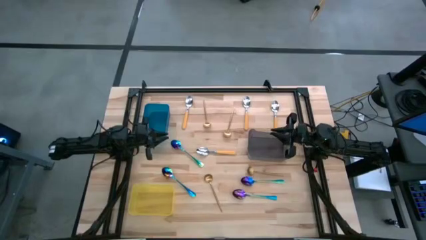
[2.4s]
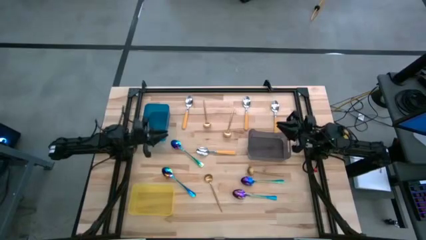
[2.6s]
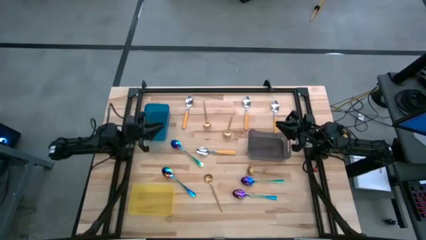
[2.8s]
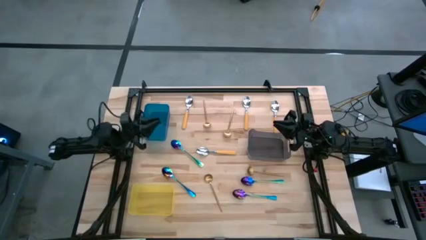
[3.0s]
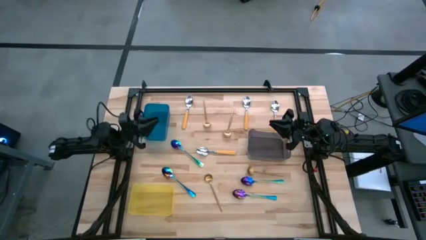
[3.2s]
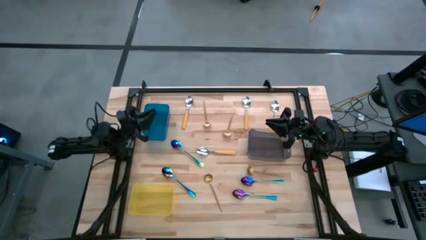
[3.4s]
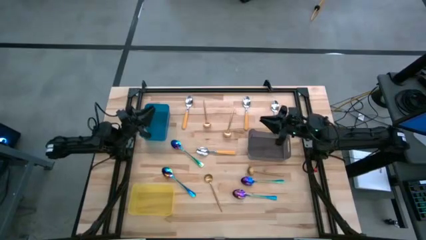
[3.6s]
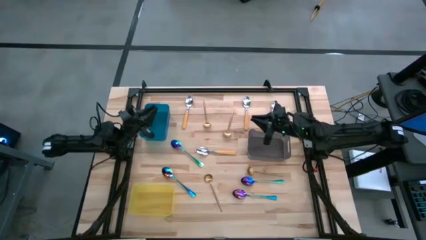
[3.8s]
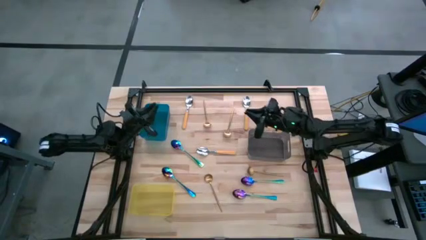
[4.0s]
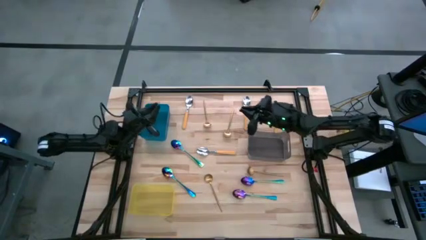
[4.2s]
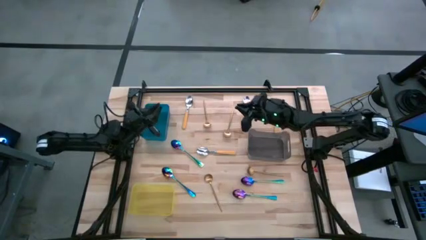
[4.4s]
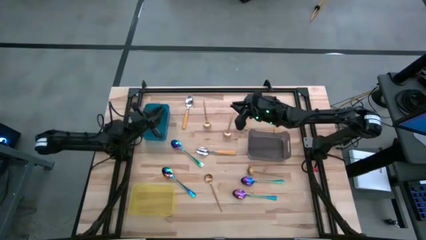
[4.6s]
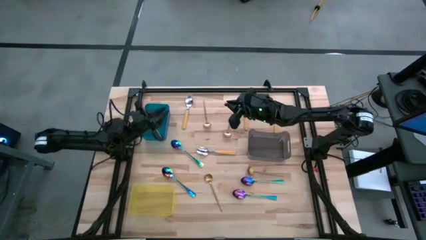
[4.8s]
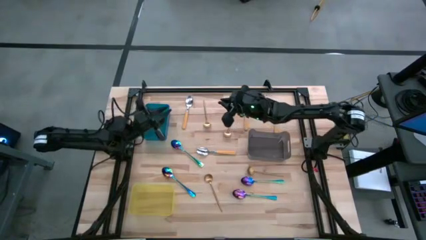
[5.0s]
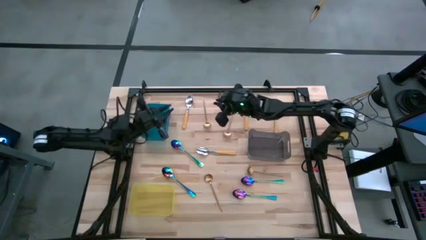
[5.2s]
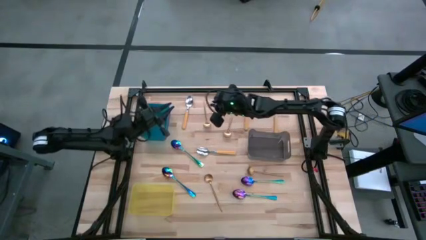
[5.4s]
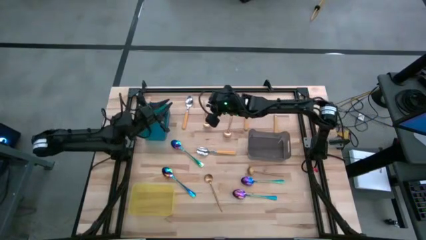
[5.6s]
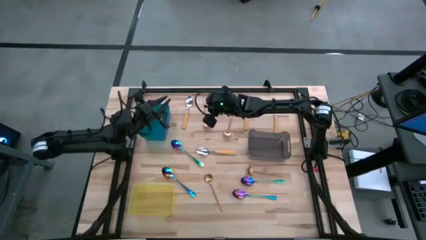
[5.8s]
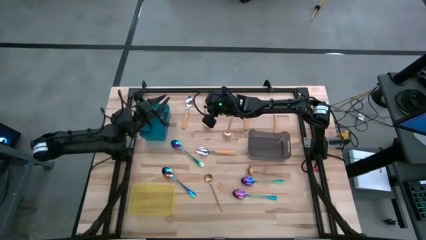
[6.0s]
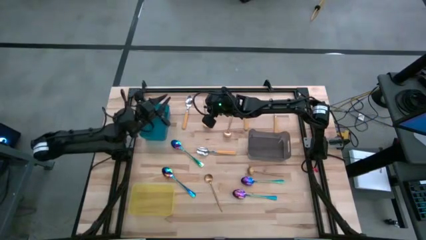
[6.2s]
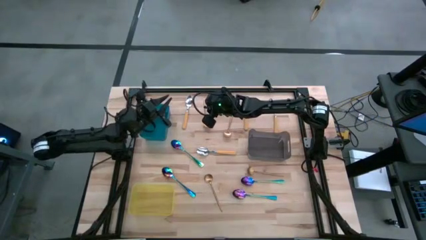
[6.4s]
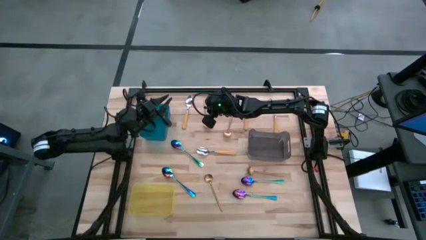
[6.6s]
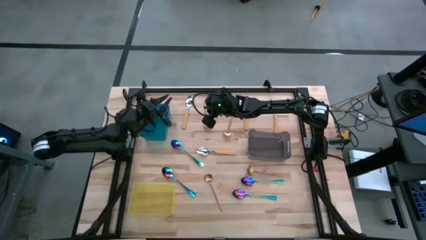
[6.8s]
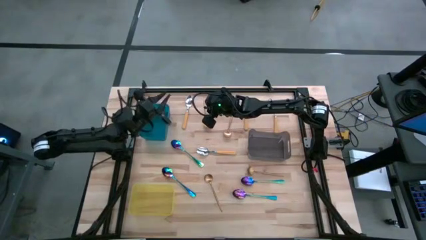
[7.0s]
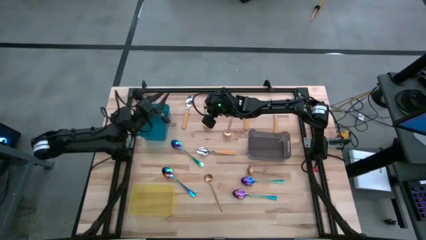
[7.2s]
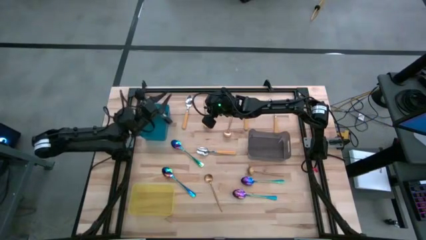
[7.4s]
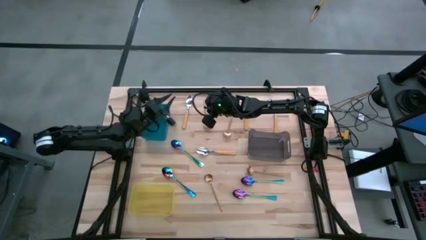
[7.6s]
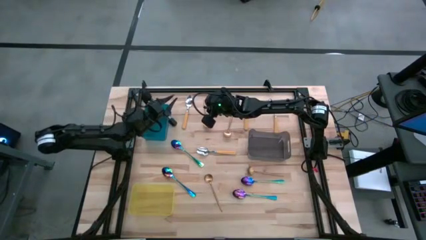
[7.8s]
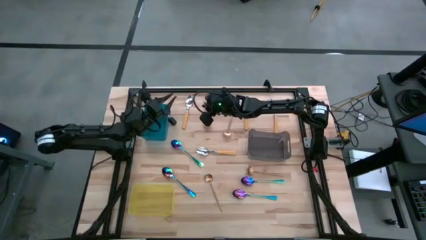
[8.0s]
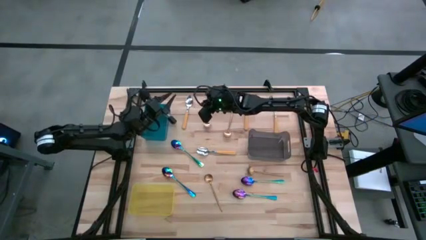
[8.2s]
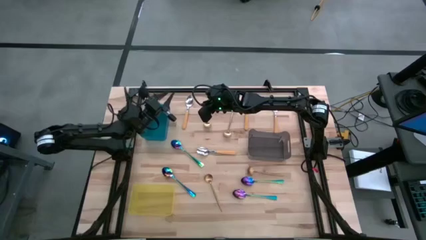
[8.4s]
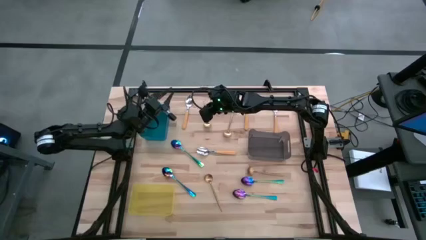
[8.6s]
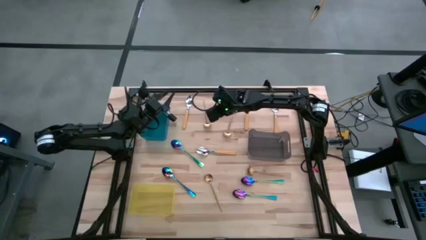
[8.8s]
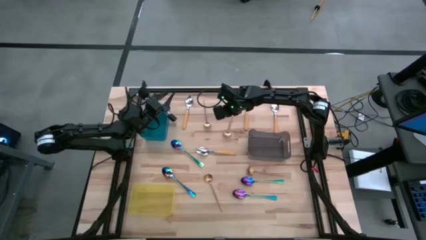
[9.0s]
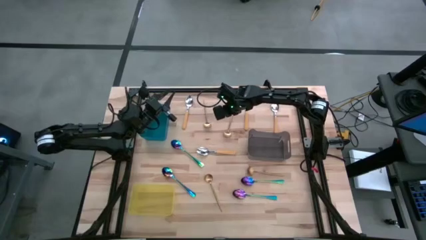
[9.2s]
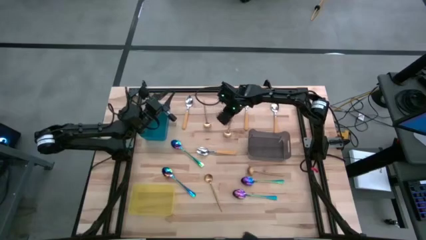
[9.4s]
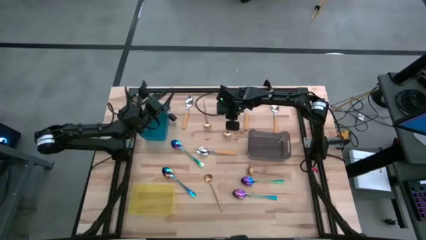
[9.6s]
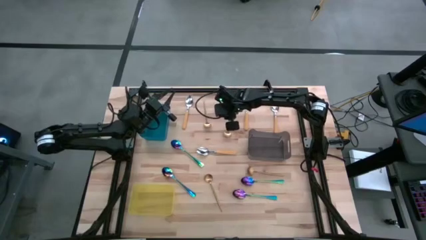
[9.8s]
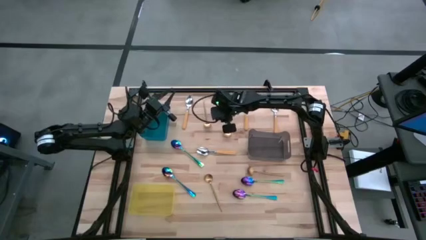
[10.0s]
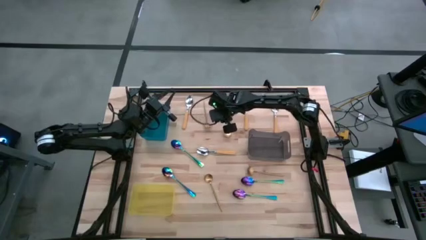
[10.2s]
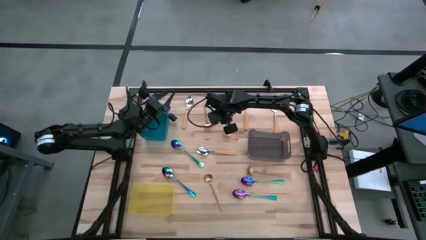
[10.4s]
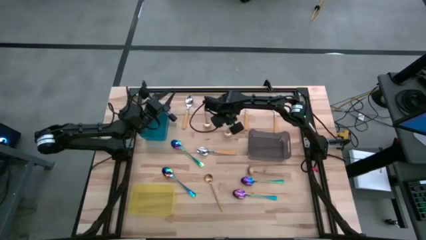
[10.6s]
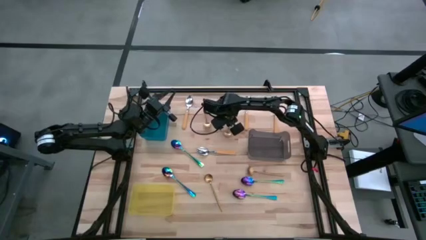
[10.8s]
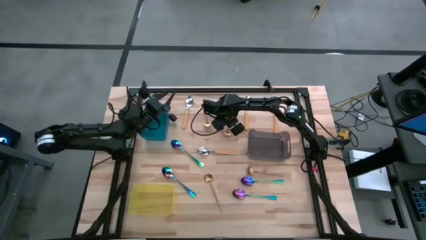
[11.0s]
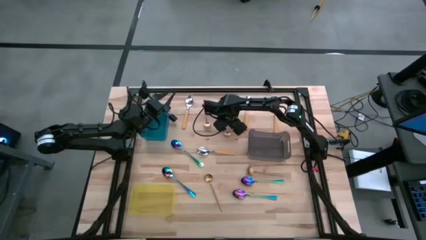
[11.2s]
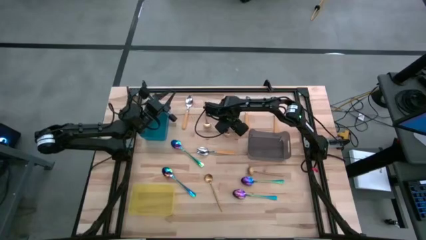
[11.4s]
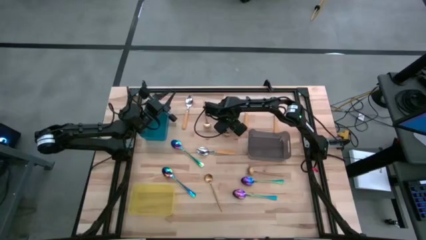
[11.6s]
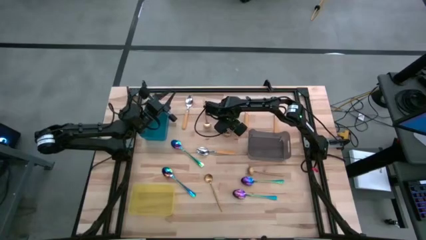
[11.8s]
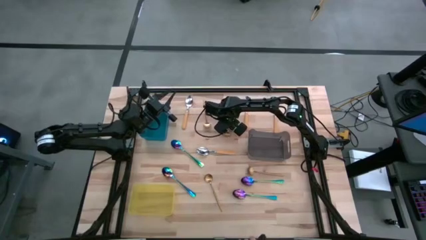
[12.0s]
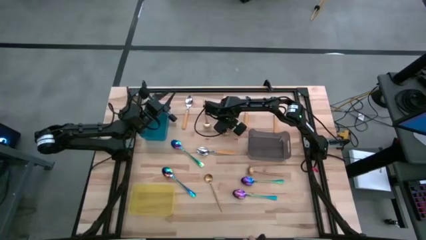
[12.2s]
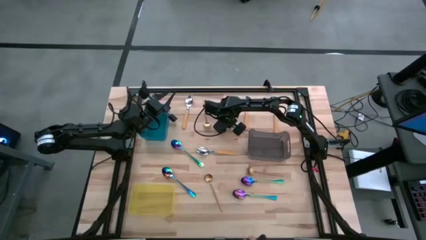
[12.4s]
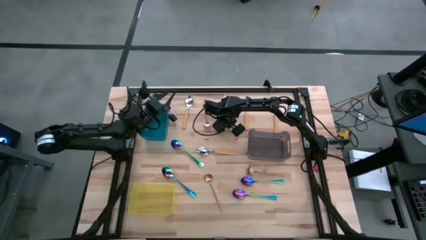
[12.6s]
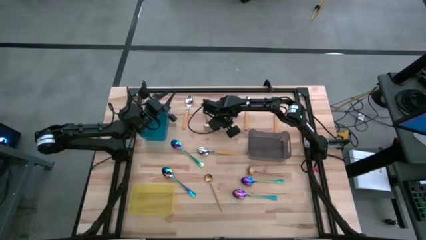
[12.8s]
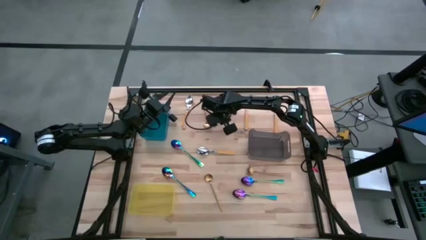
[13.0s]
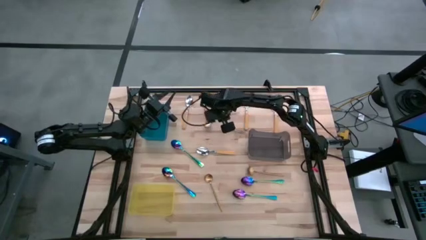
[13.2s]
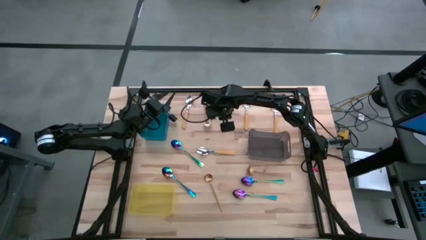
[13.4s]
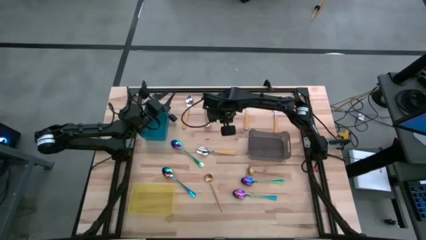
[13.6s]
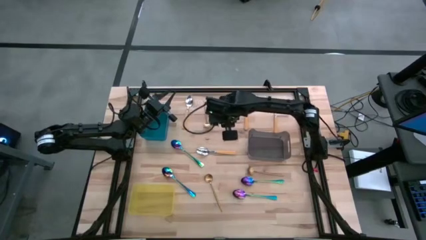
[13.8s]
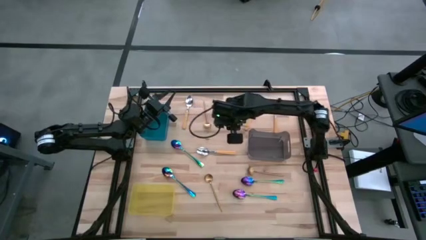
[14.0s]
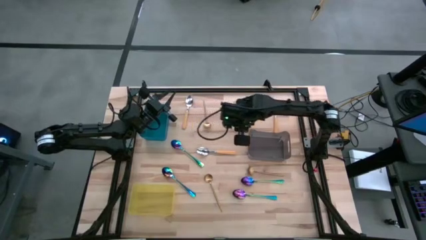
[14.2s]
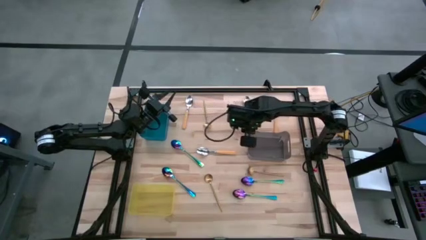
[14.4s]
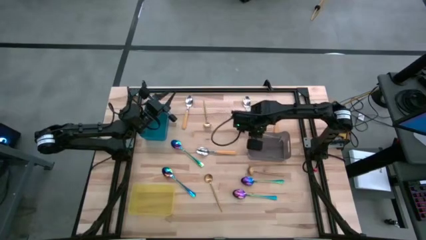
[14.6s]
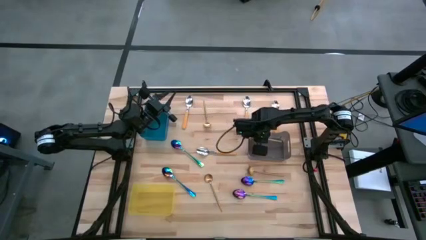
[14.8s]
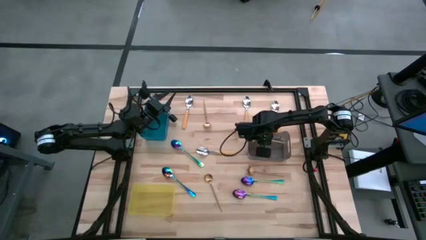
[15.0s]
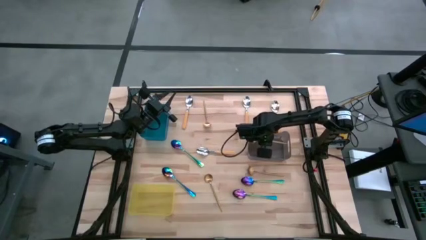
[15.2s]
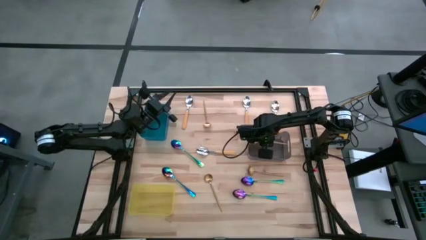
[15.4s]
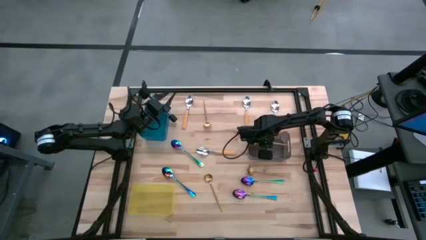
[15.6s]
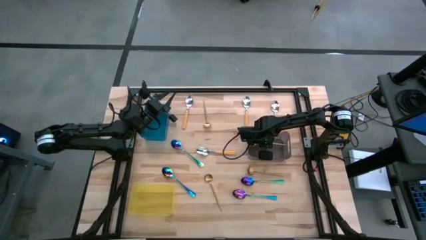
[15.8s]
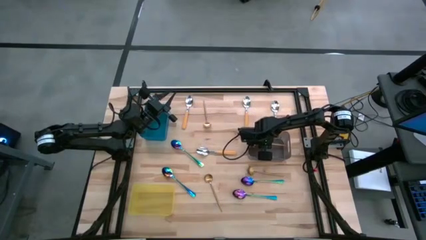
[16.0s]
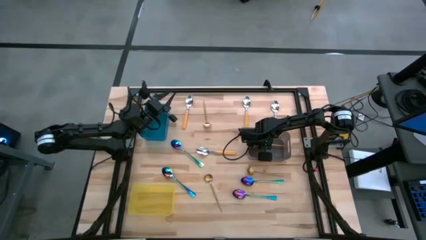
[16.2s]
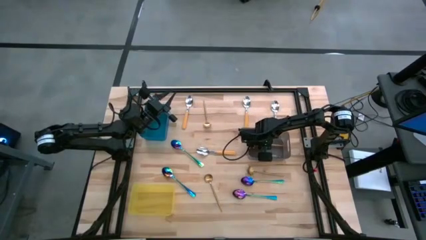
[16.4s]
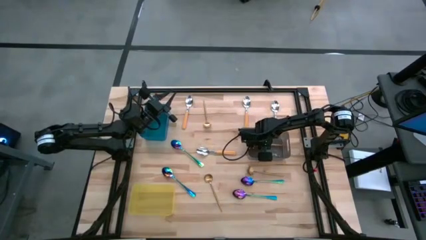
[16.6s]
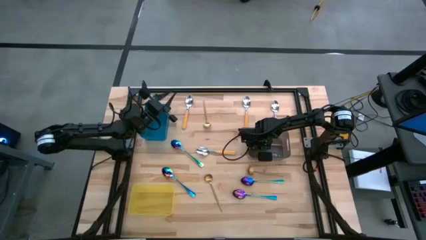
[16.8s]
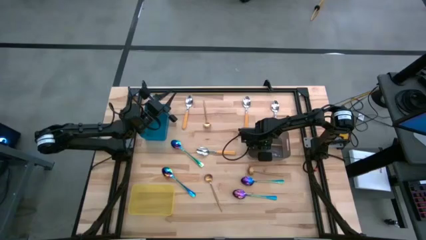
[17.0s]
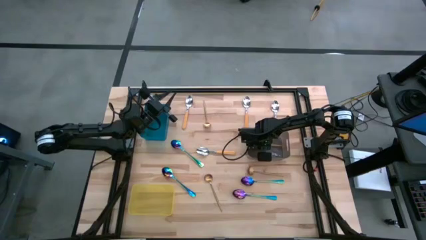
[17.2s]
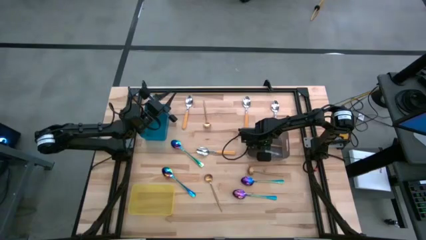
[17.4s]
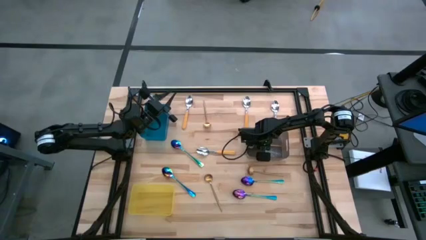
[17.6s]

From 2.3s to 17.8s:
Task: Sort silverware by color (type)
Put the gold spoon into the black bin

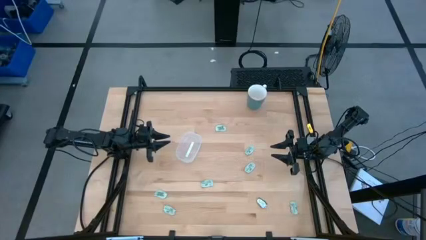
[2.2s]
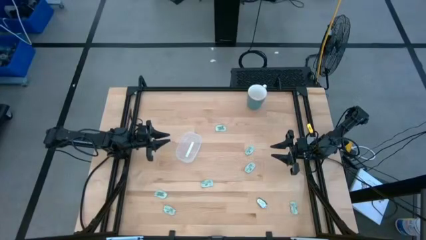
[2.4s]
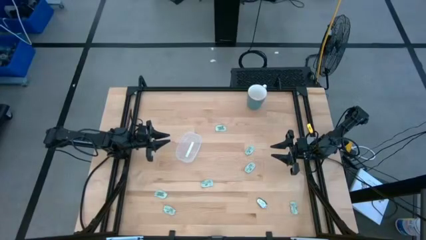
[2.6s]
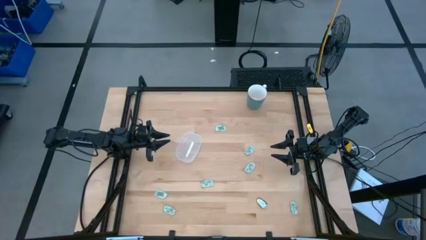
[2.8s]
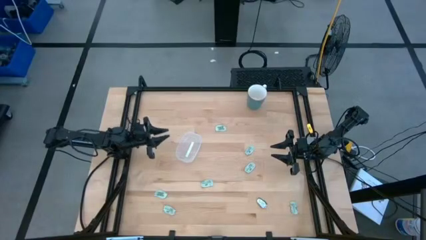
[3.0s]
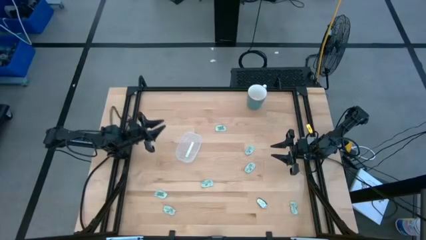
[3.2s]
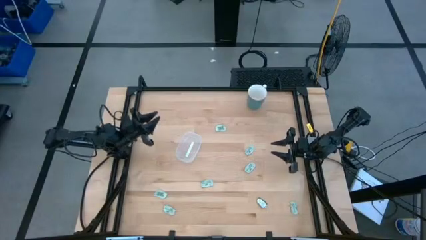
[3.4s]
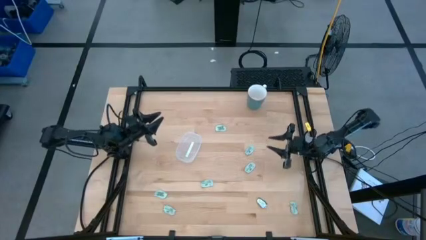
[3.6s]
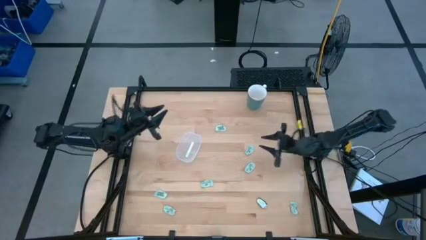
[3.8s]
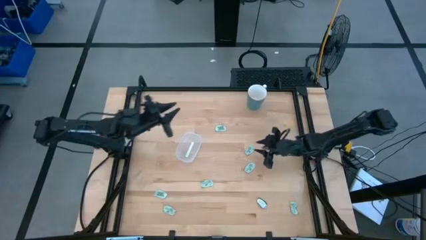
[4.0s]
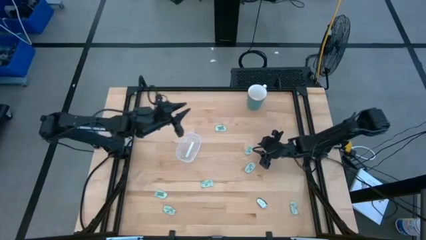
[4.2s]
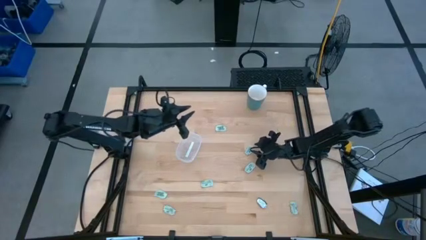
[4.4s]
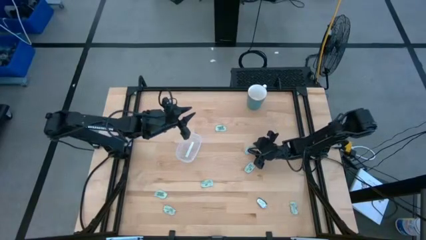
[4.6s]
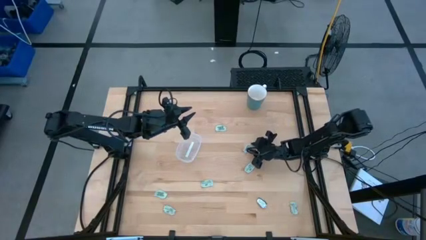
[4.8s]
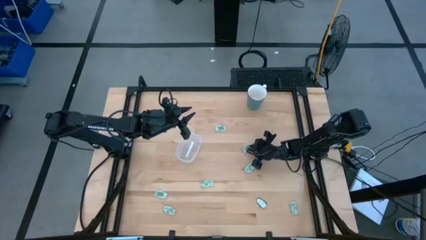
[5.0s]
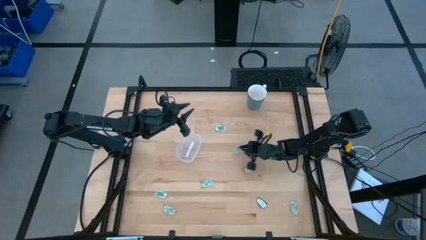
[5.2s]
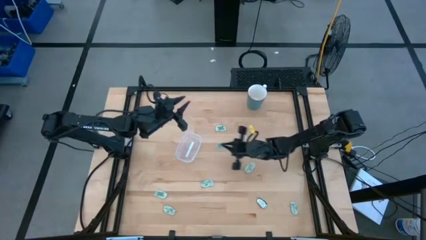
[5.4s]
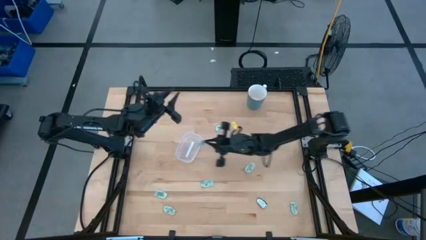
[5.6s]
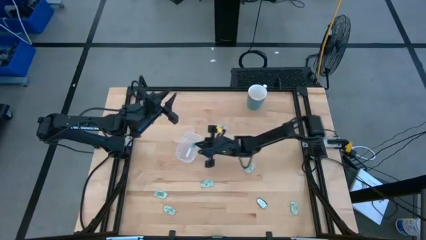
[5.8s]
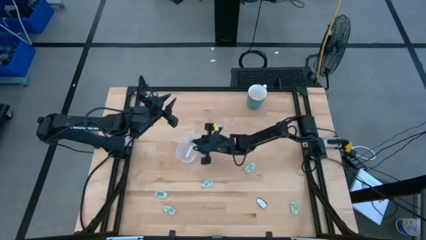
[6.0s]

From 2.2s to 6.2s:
Task: Pick and place Stevia / Truvia into bins
Put the green stevia packet into the transparent bin
